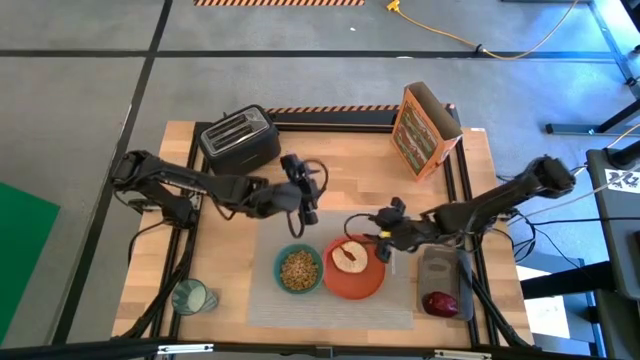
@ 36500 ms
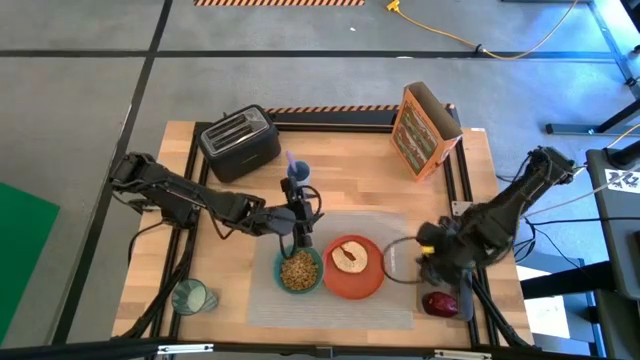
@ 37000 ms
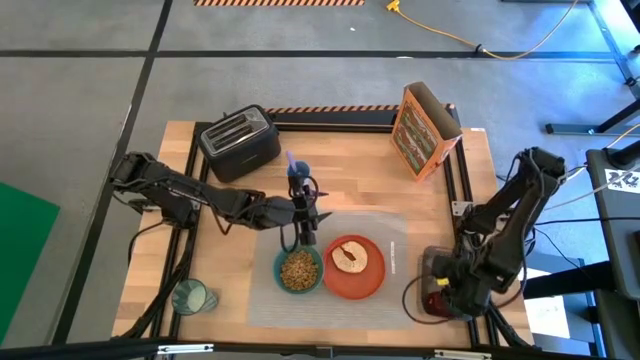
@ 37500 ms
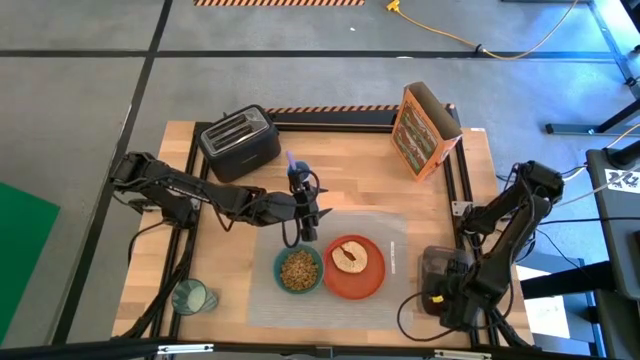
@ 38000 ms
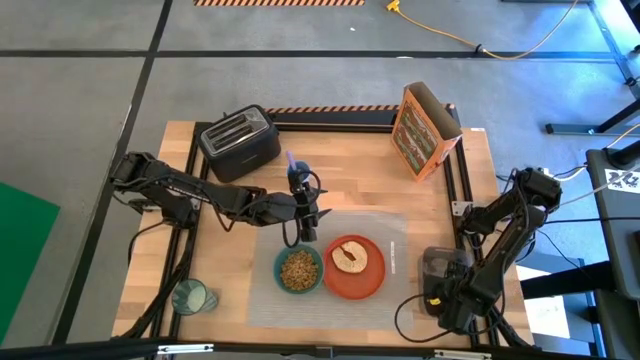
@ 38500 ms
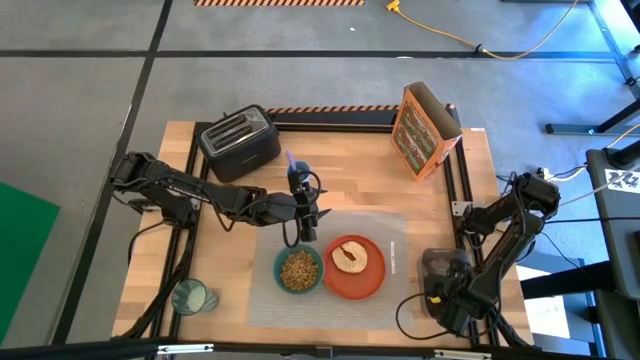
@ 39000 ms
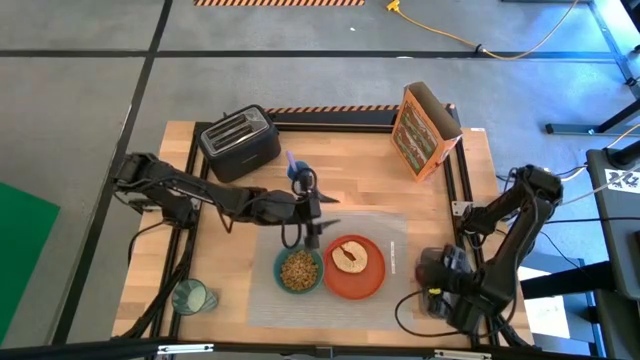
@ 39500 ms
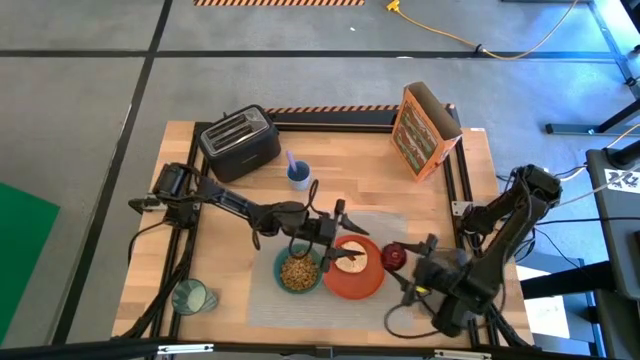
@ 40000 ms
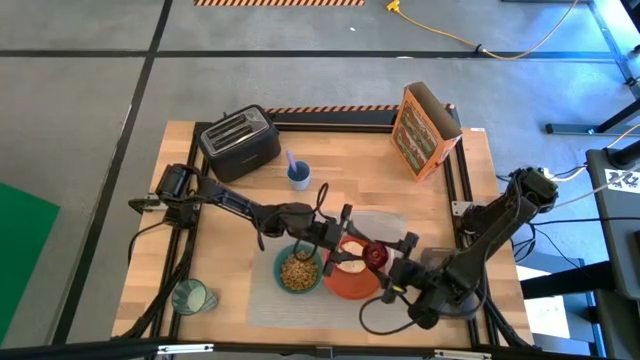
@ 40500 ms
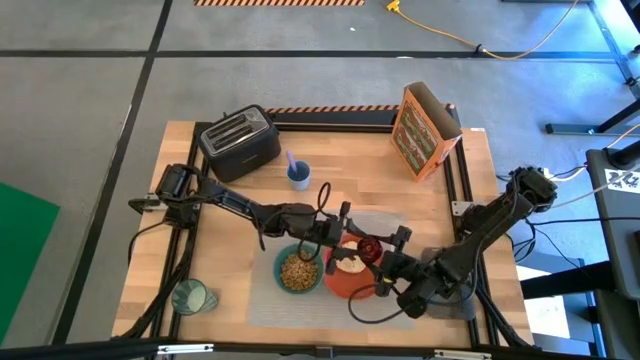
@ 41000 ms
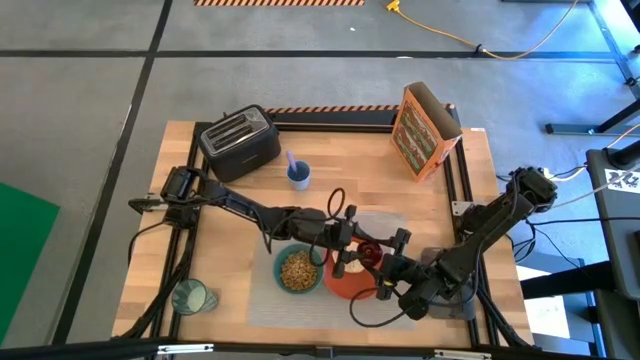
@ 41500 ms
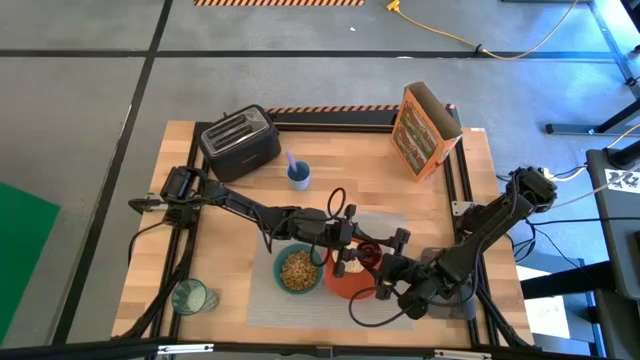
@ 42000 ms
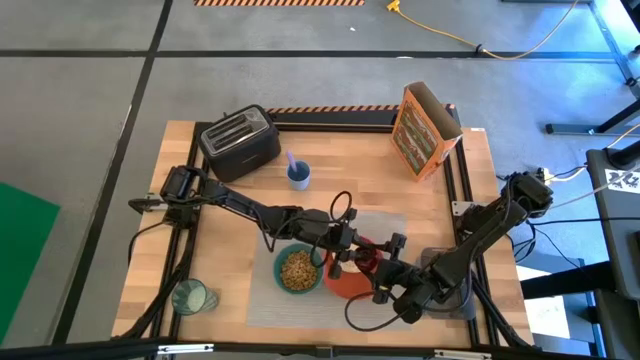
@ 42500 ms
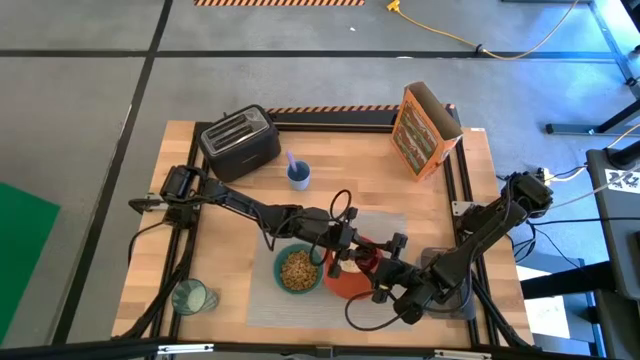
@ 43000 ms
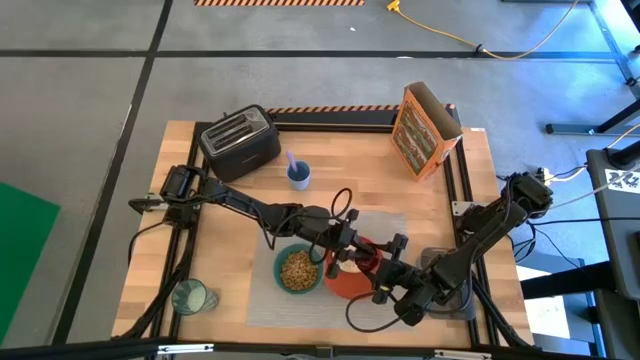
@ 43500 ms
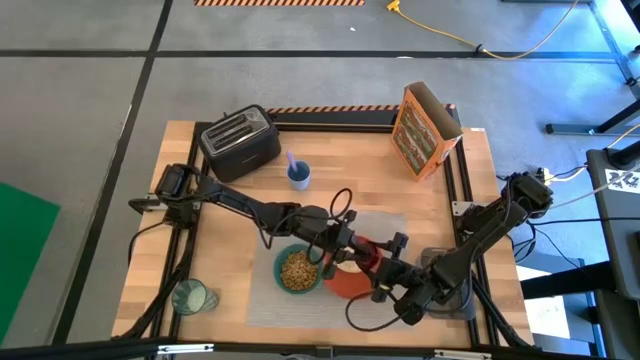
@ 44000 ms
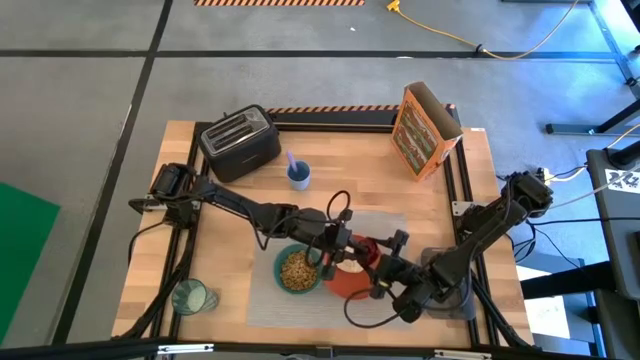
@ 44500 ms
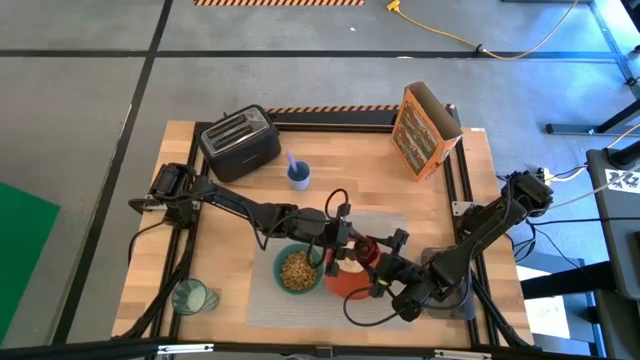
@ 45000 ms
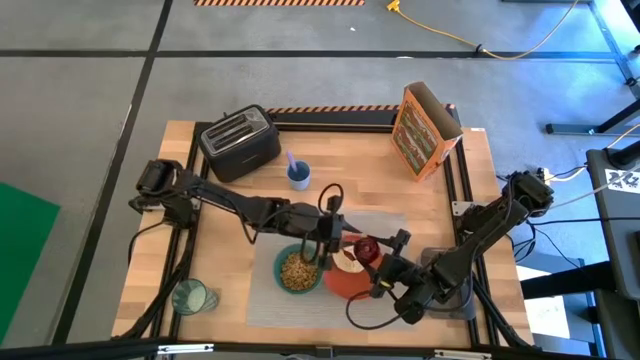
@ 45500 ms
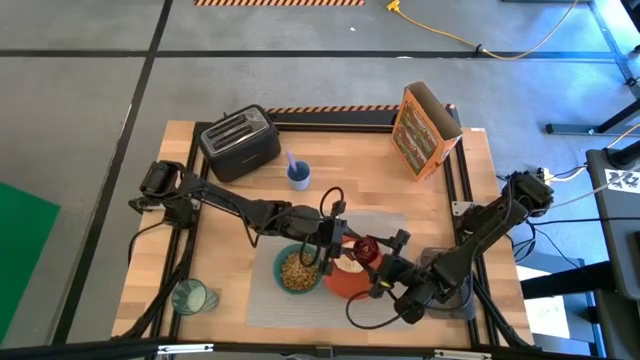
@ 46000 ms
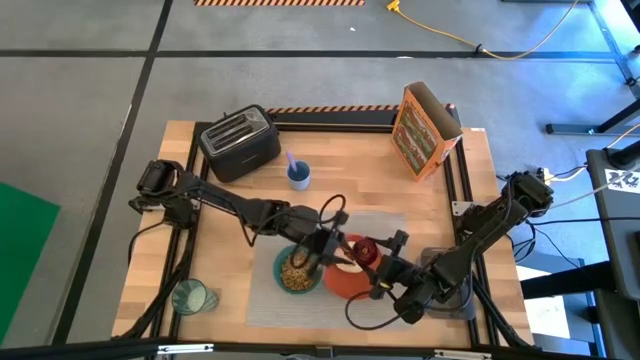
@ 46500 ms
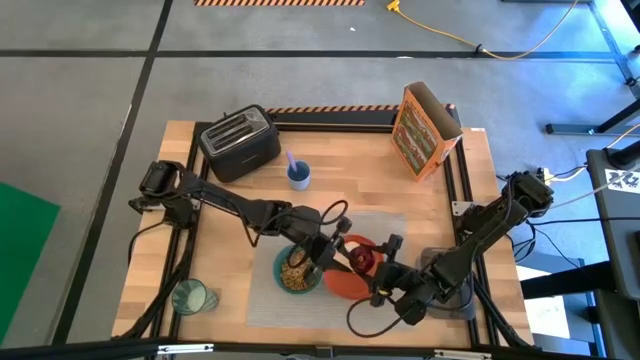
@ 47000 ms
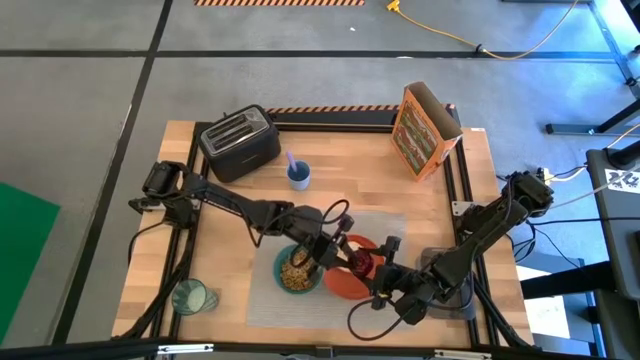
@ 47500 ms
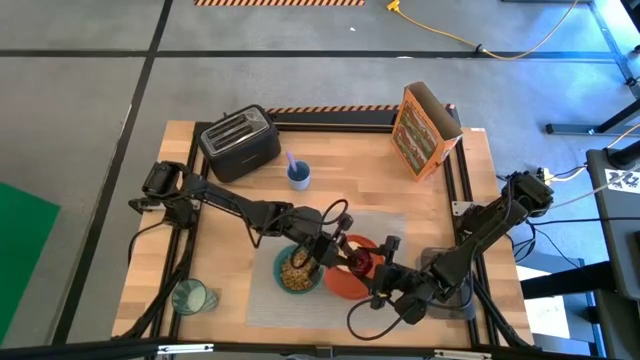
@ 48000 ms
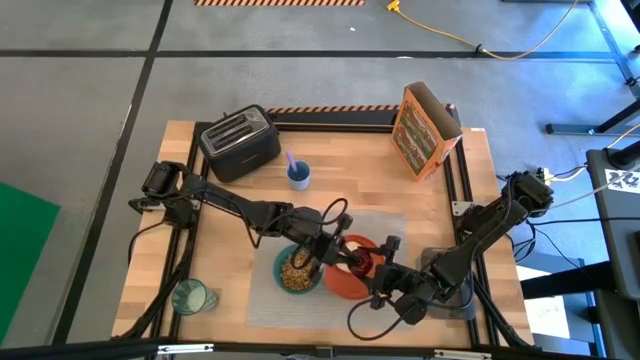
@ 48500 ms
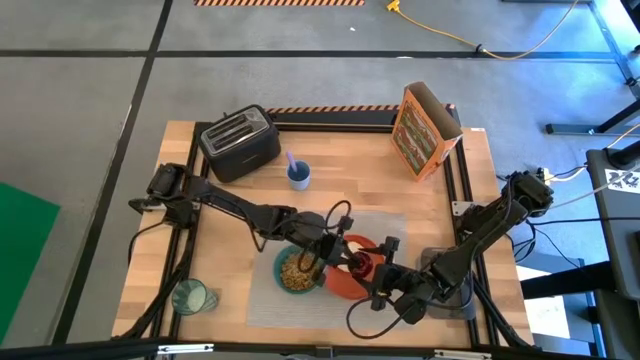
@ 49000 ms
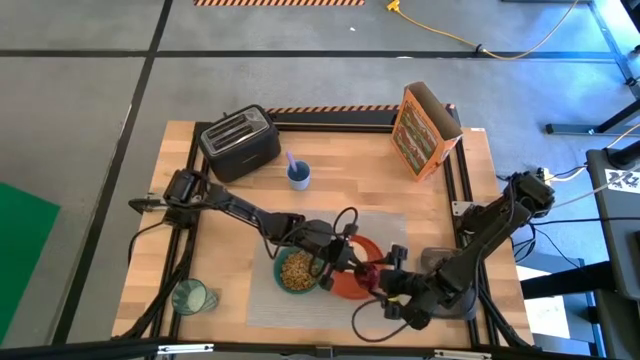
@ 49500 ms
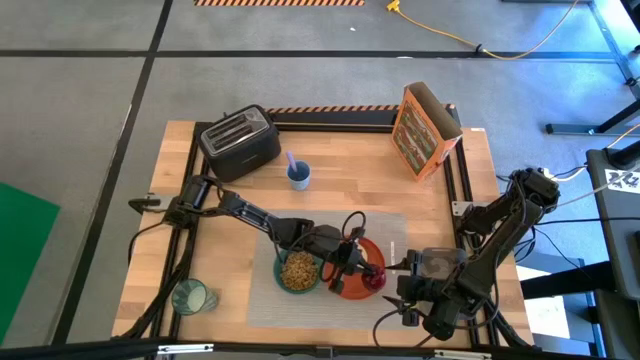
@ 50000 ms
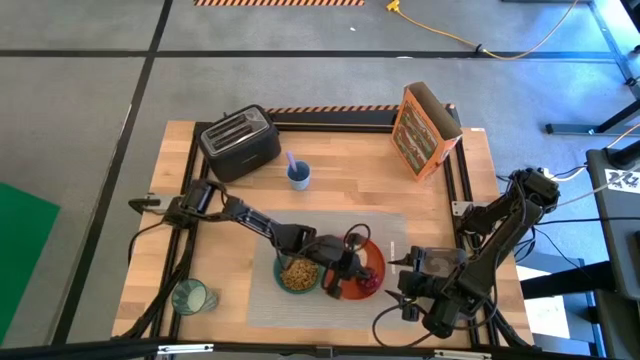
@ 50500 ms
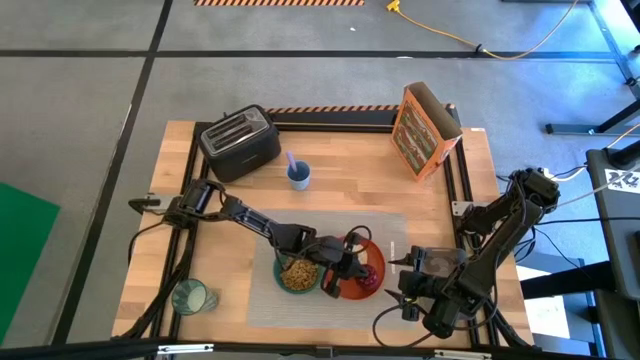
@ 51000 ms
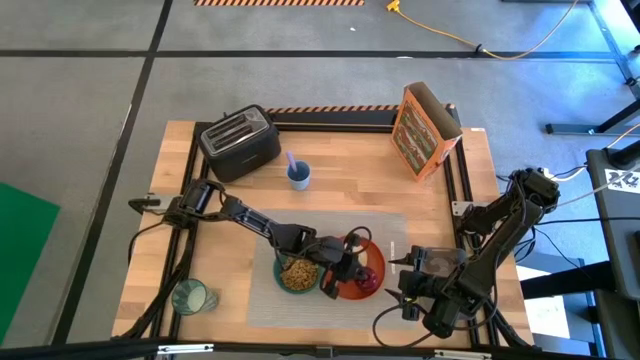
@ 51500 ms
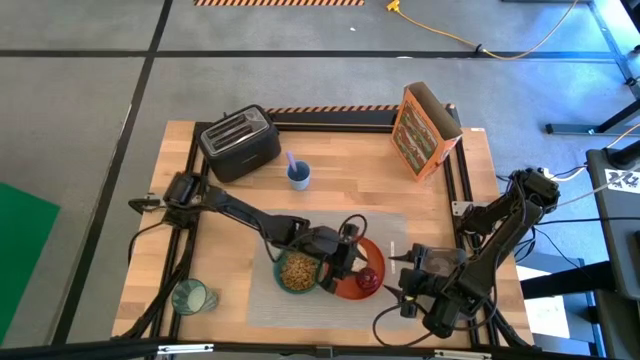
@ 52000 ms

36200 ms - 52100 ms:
Task: Arrange a breakfast setting
Put the red apple on the orange plate

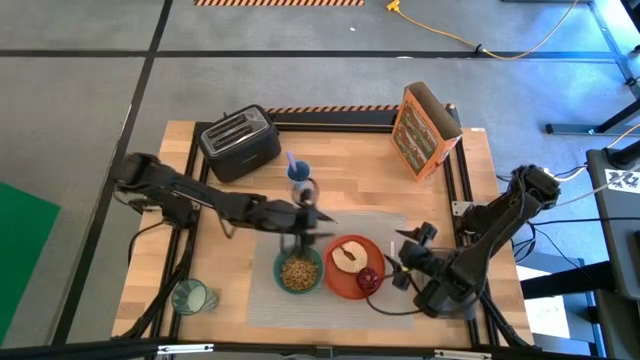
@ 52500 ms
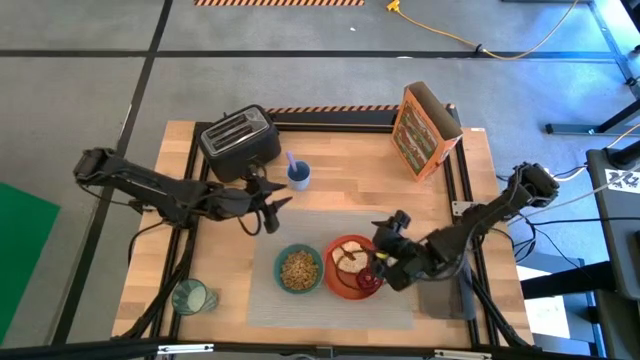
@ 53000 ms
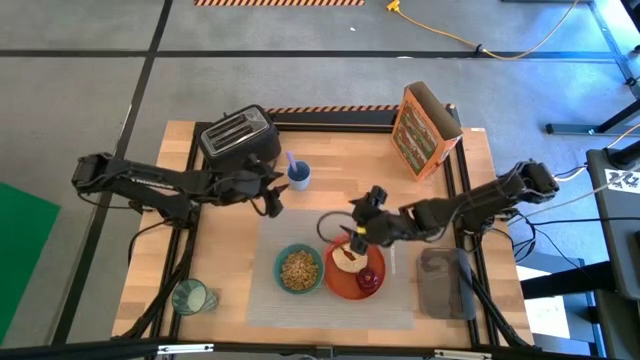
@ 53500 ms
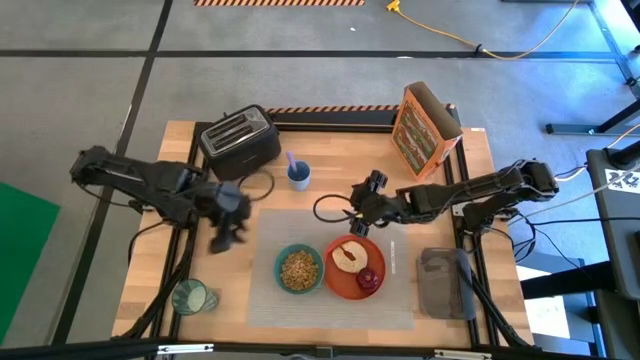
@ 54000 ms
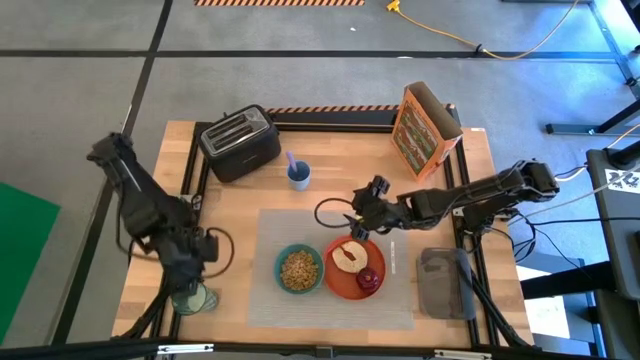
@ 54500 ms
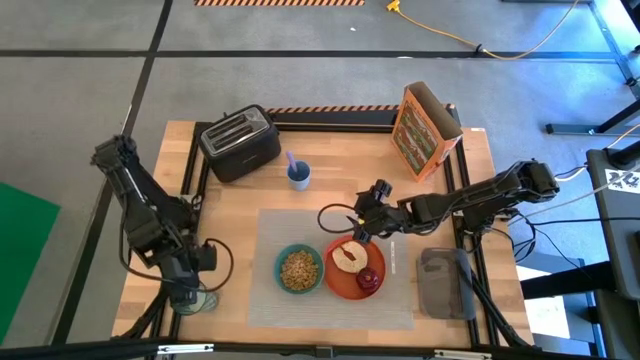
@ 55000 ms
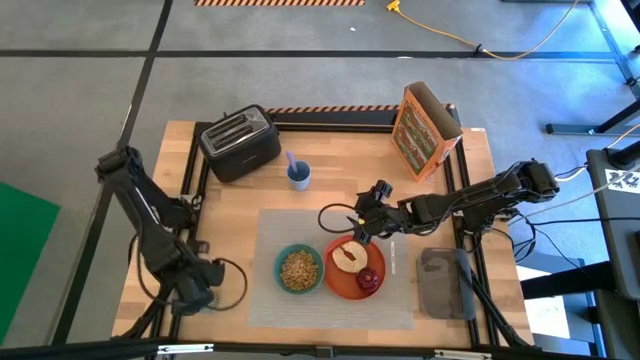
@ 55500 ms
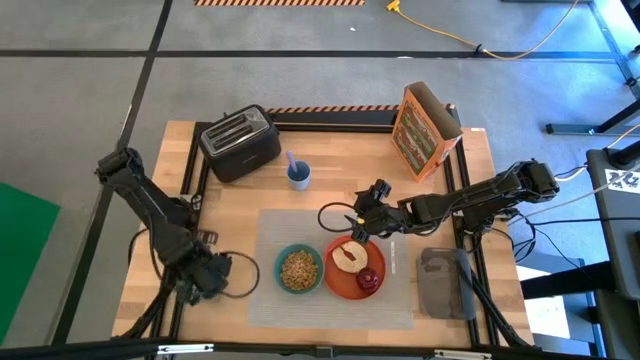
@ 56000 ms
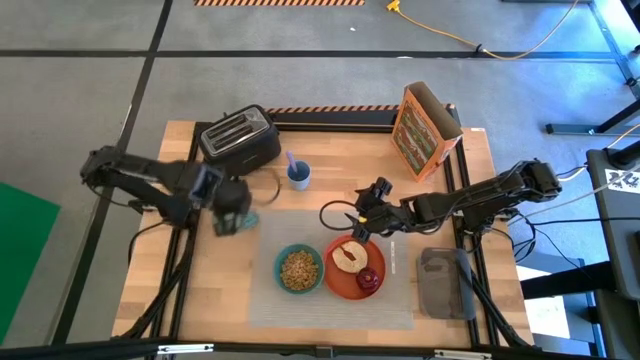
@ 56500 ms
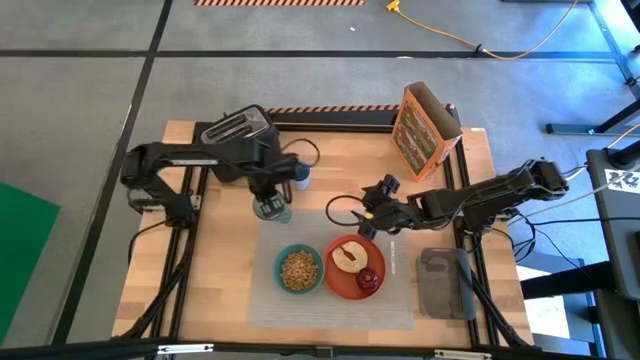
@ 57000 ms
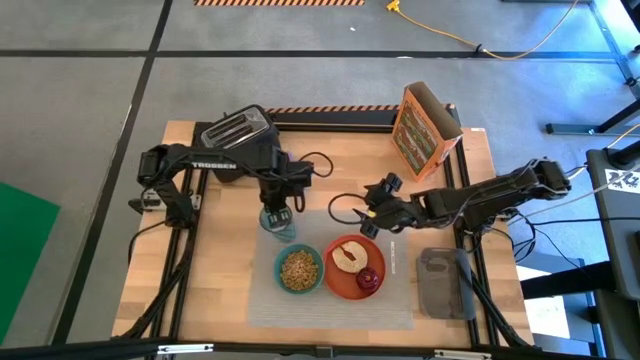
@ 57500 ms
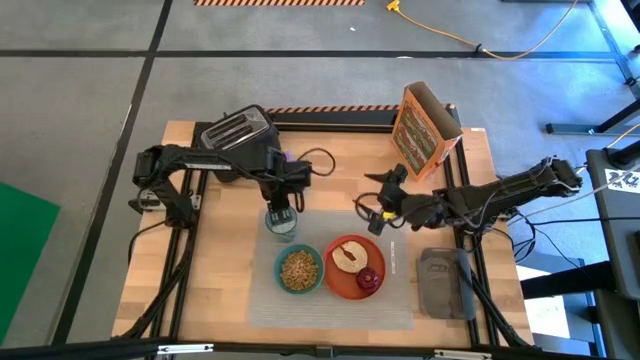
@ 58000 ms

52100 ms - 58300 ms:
Put the green cup on the mat
